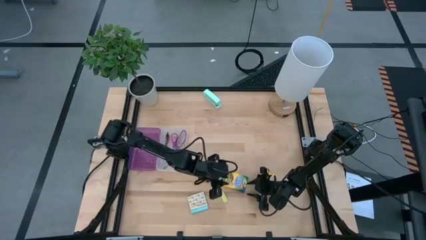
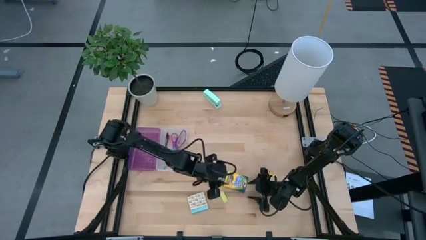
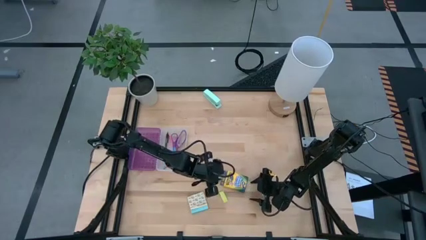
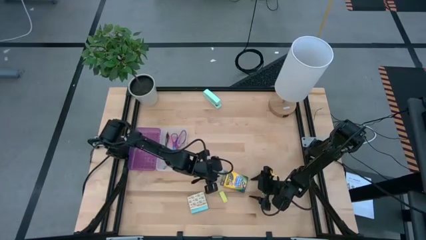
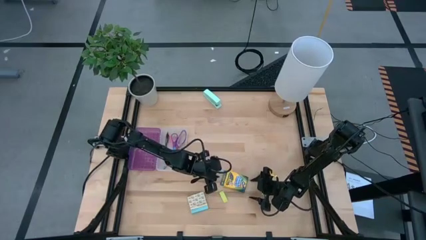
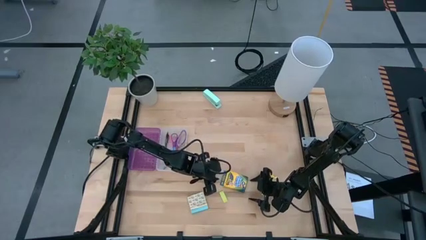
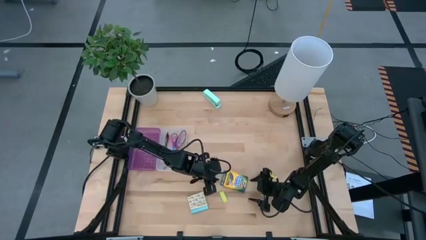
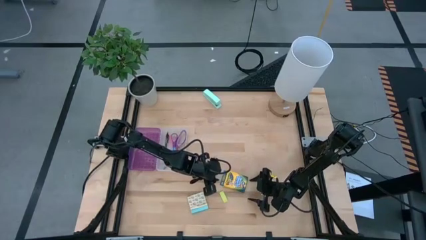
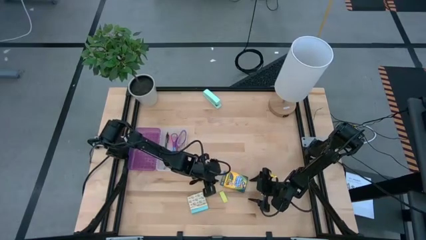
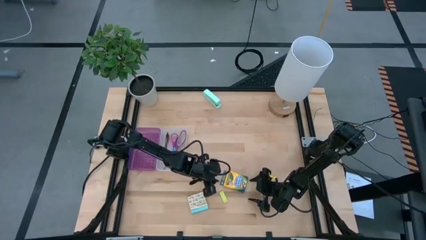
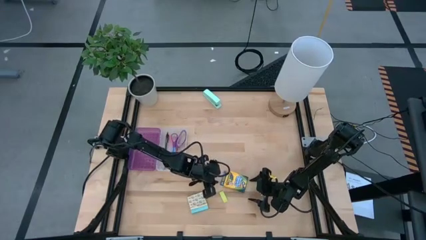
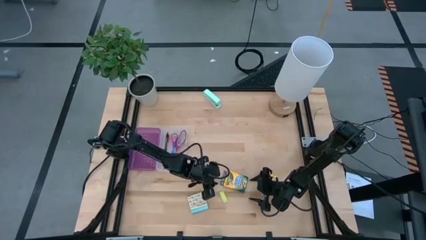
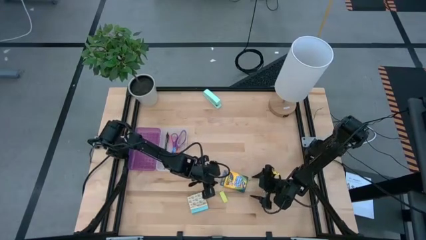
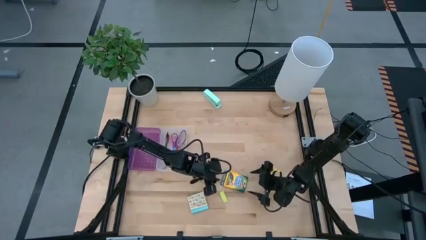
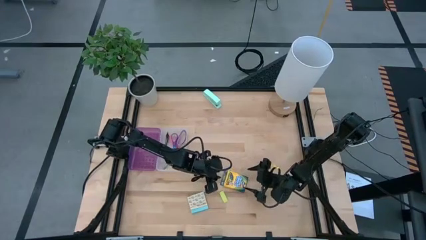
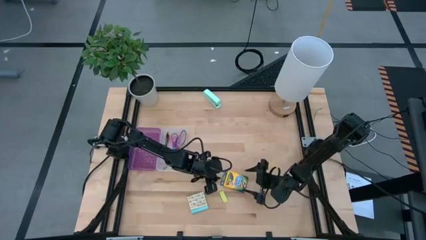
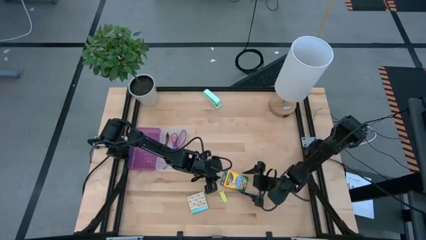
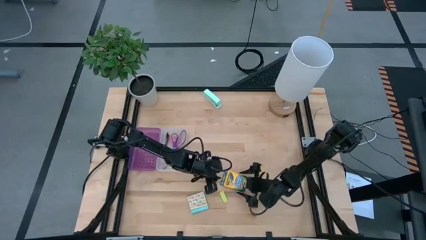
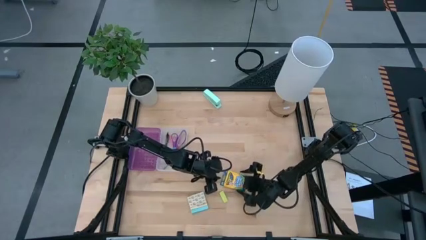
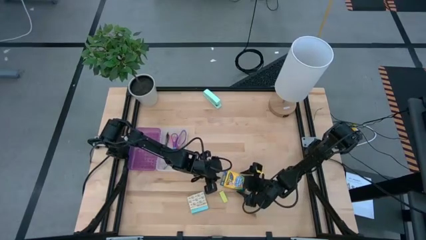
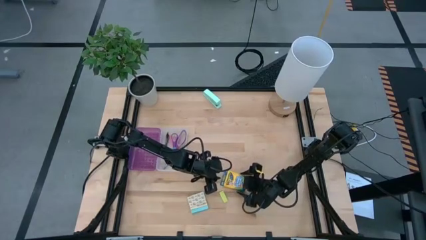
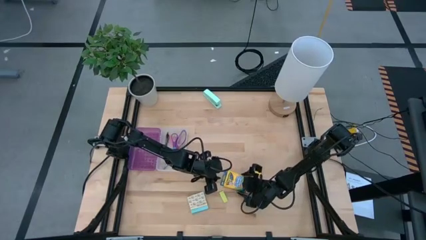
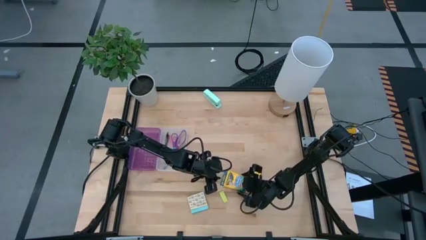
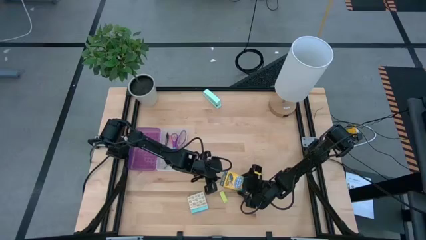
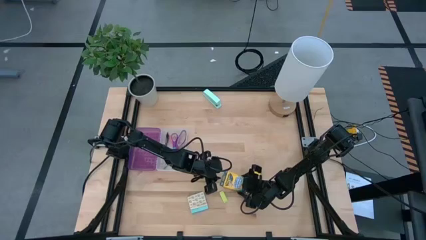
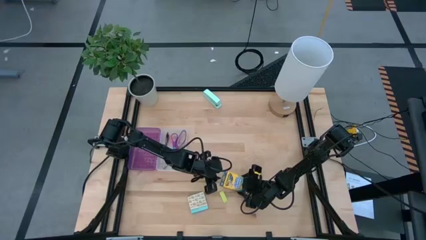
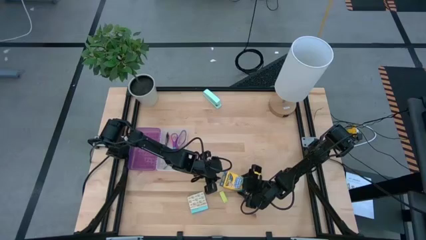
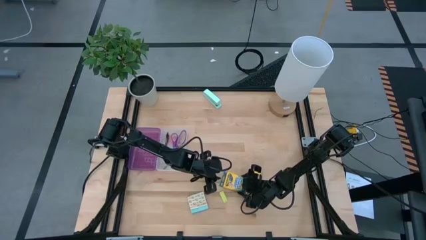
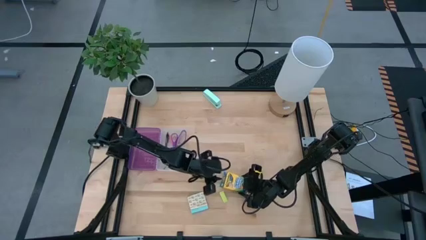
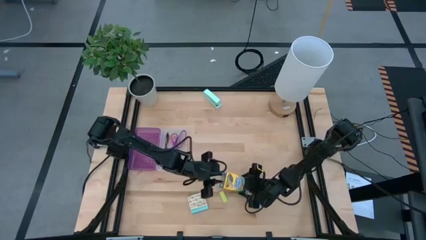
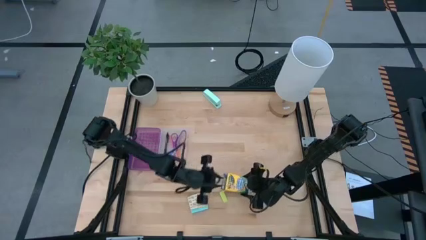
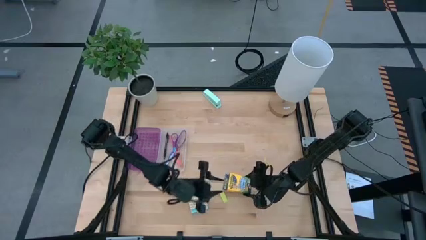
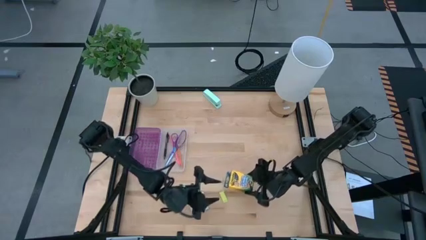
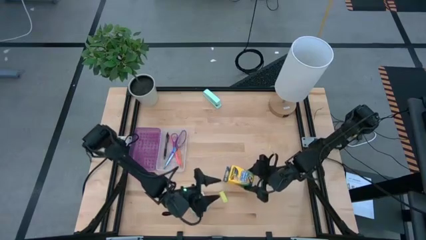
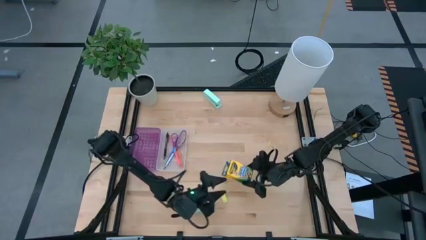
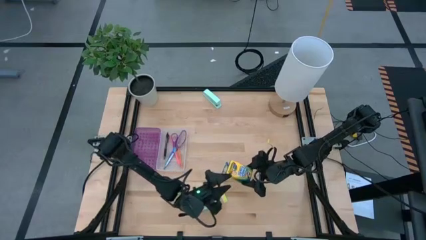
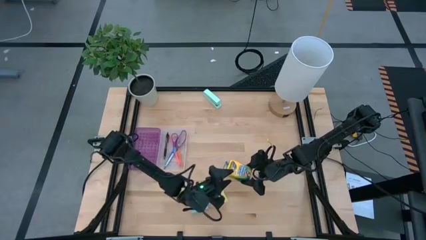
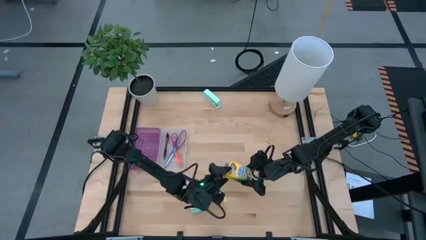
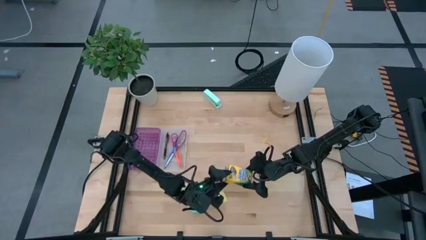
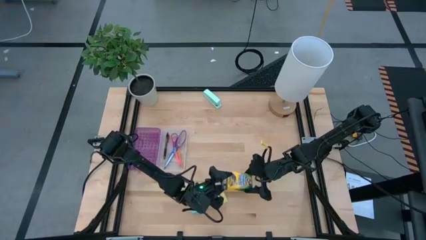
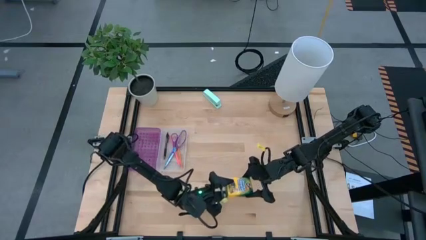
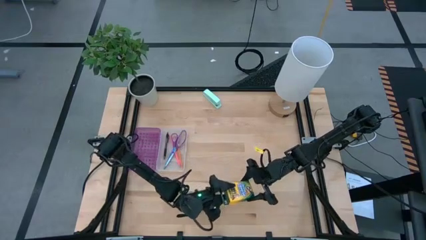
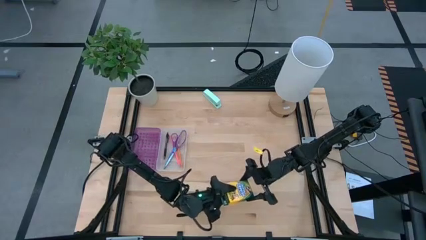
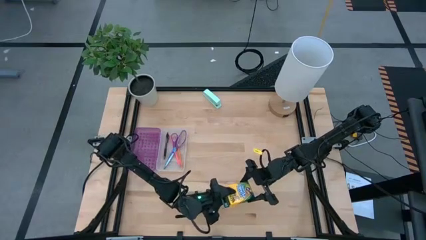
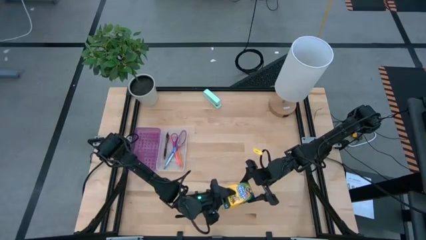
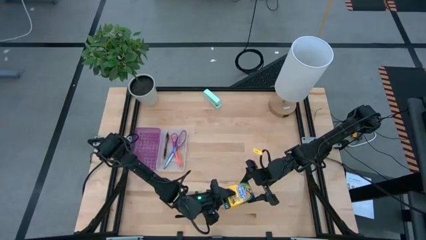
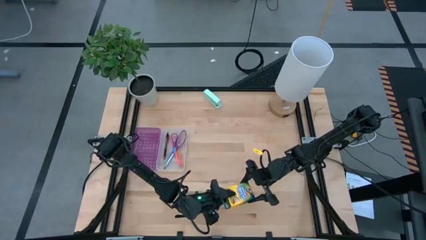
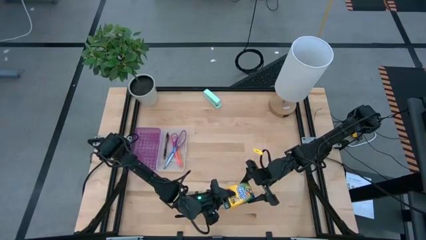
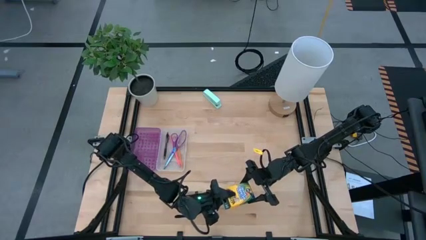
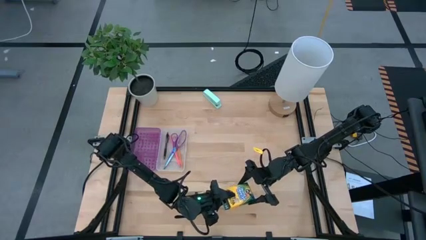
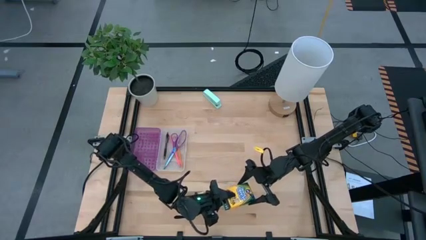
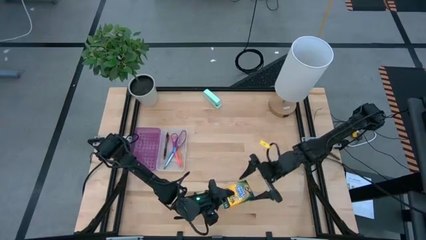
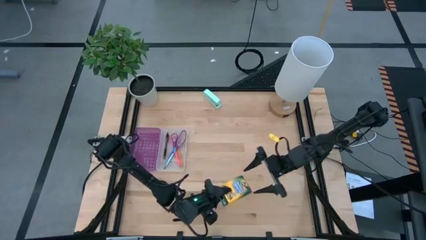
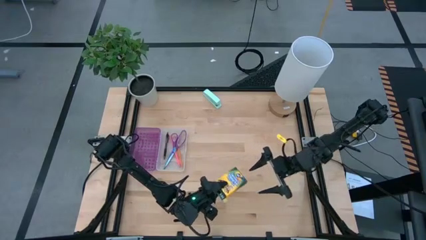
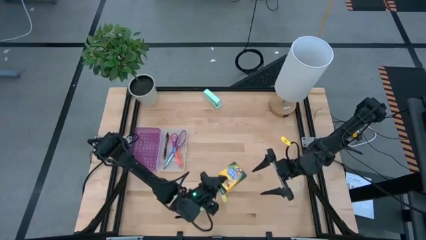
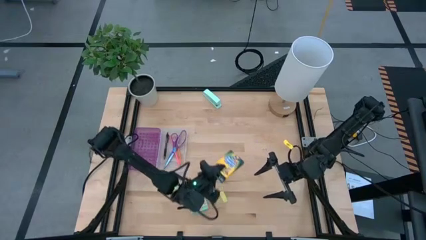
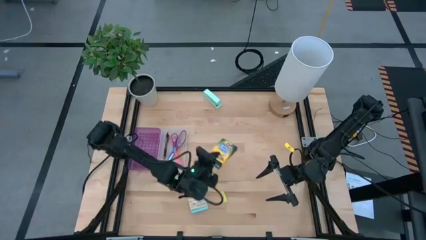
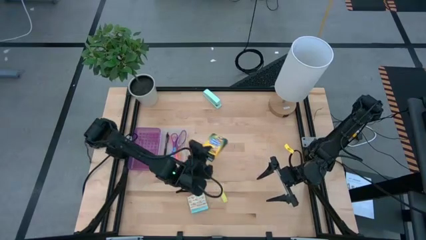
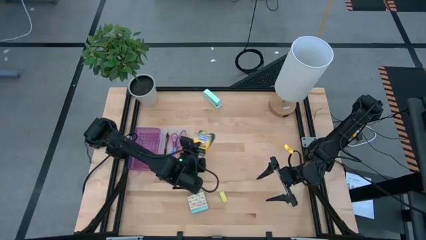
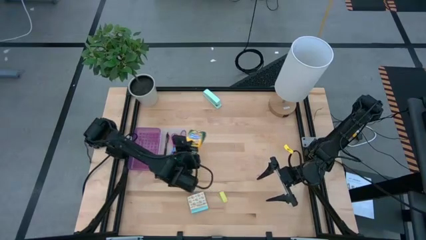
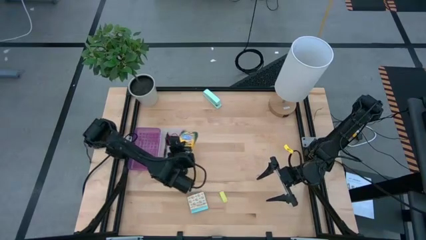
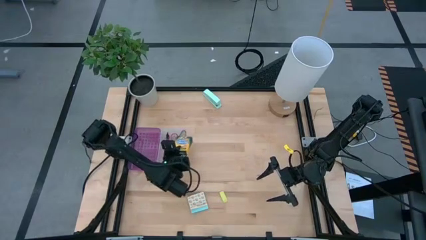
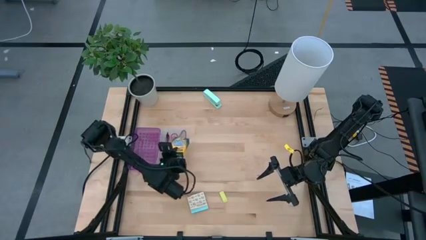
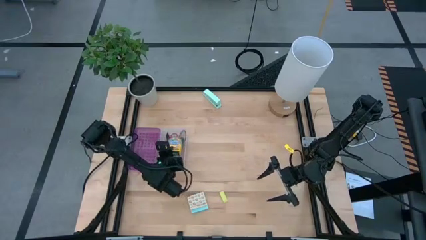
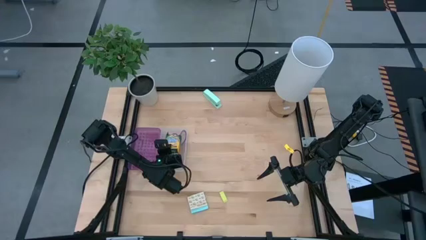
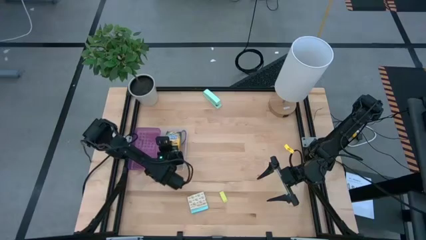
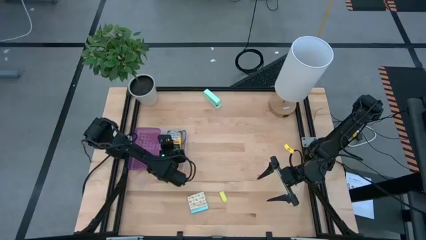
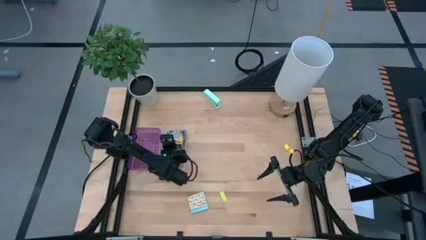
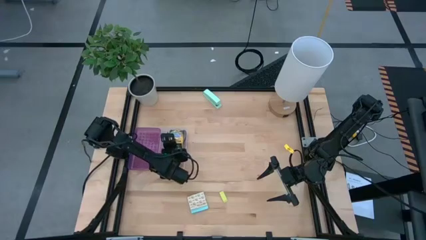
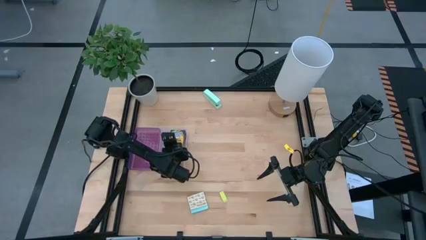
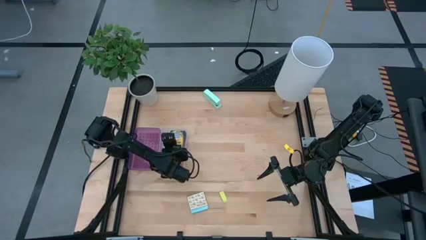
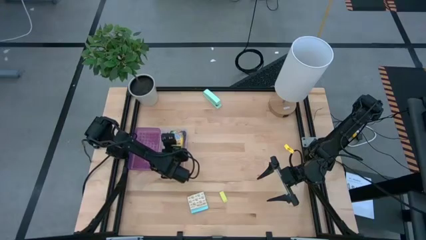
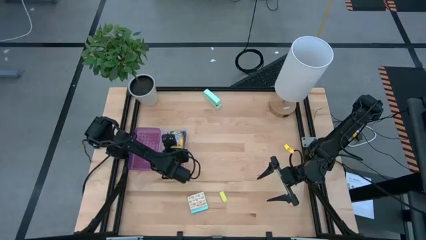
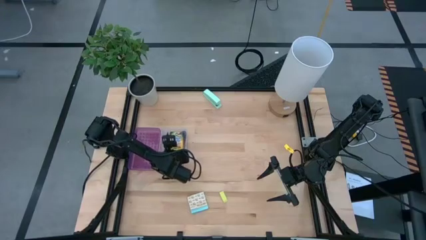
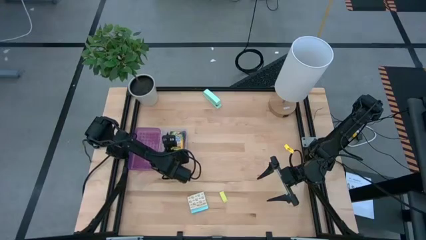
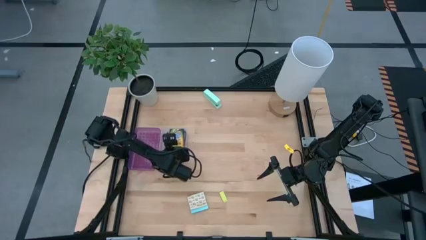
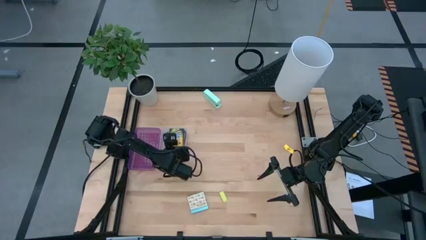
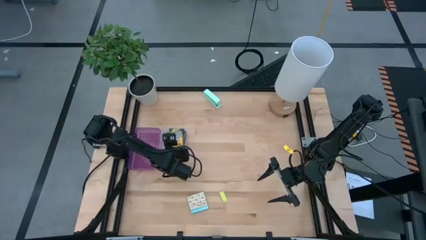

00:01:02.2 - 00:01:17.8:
Task: Pack school essentials
Put the crayon box into the purple supply box
